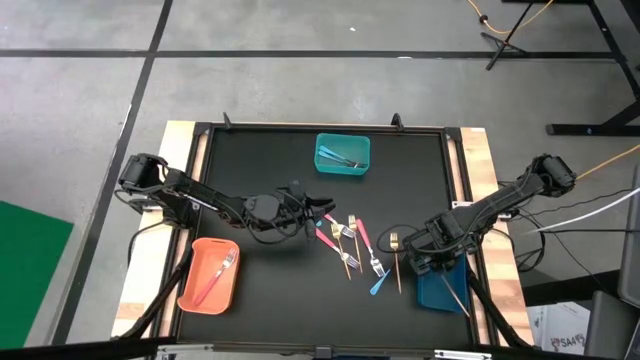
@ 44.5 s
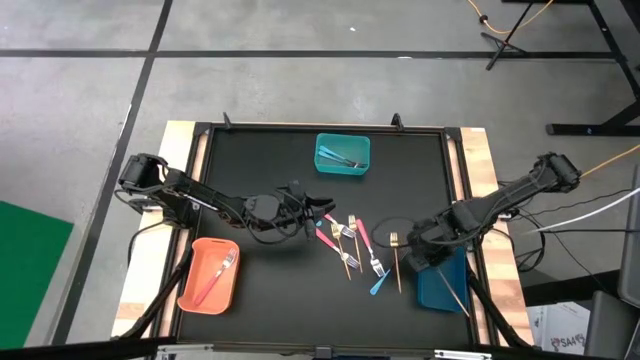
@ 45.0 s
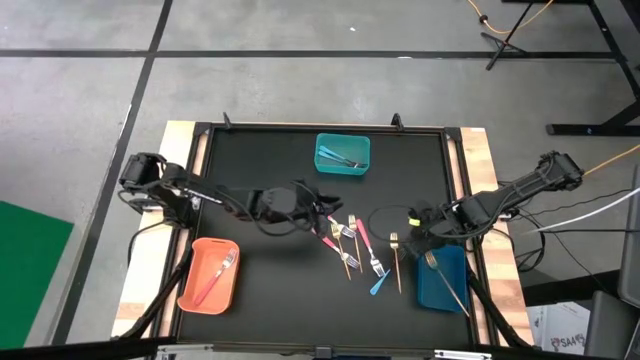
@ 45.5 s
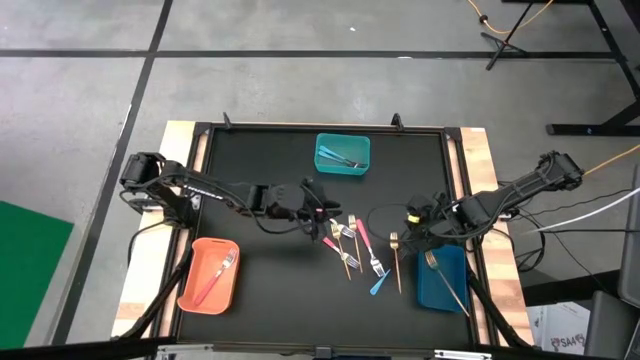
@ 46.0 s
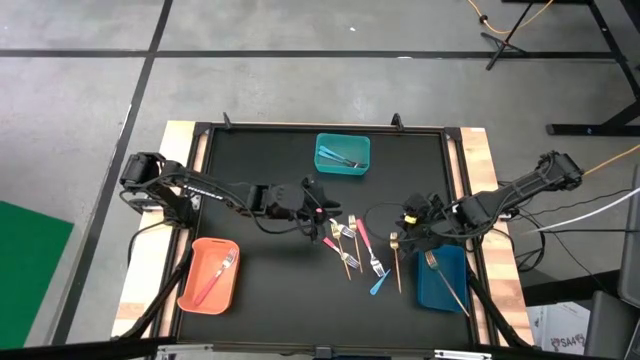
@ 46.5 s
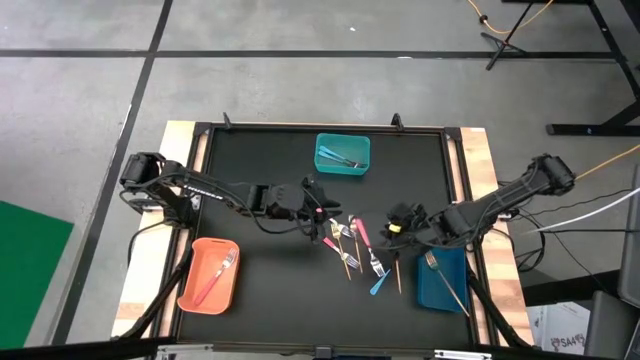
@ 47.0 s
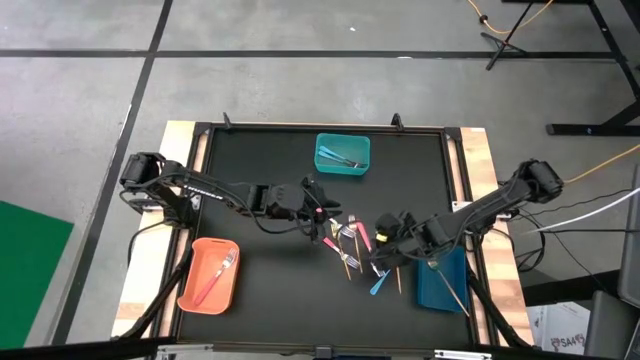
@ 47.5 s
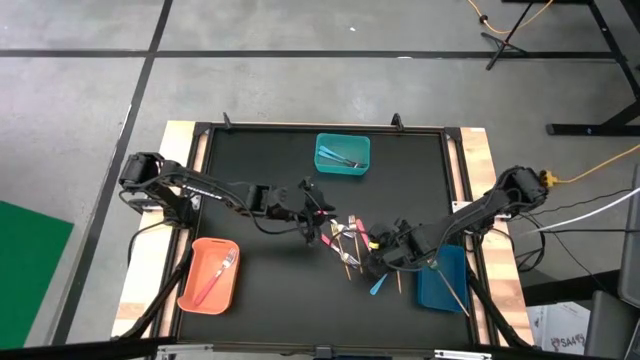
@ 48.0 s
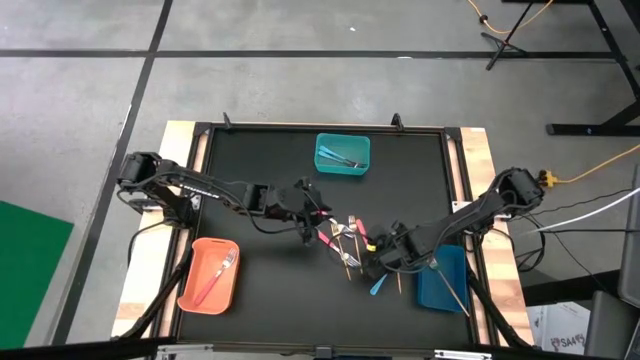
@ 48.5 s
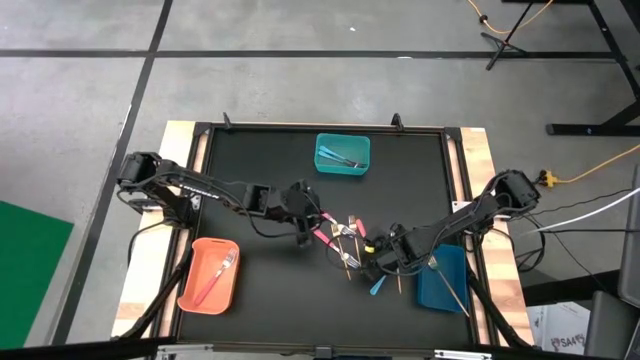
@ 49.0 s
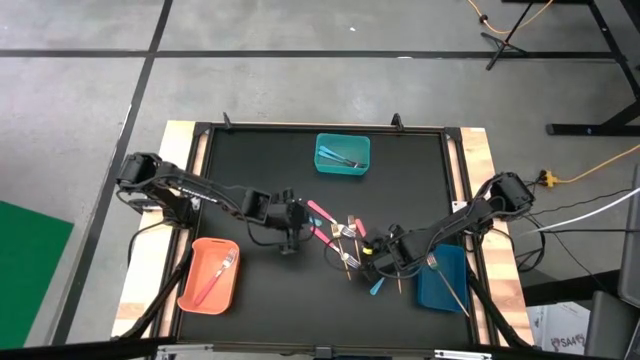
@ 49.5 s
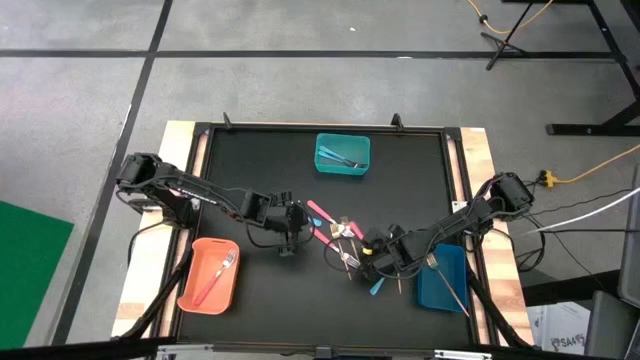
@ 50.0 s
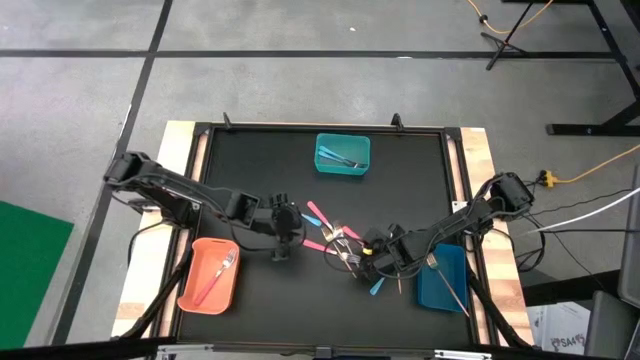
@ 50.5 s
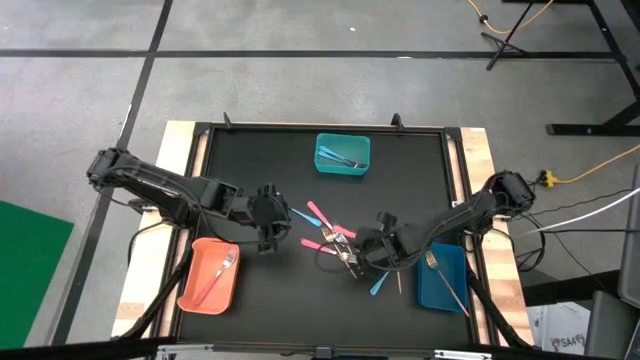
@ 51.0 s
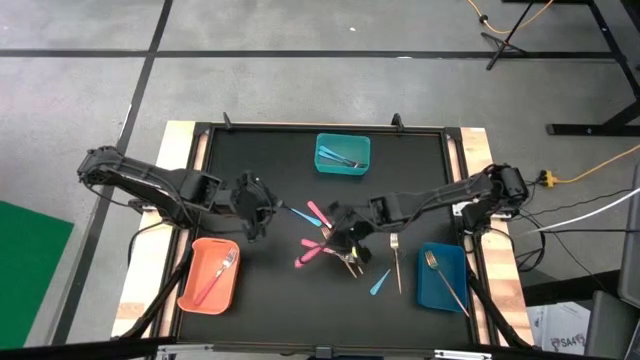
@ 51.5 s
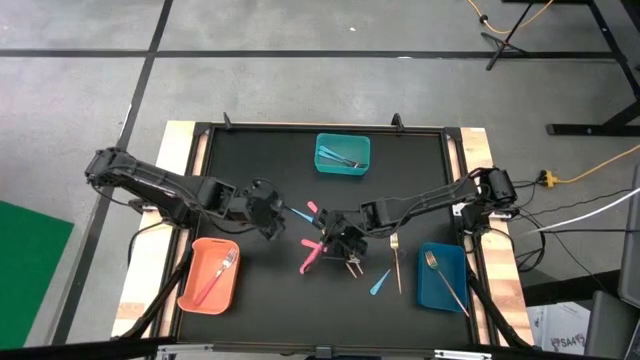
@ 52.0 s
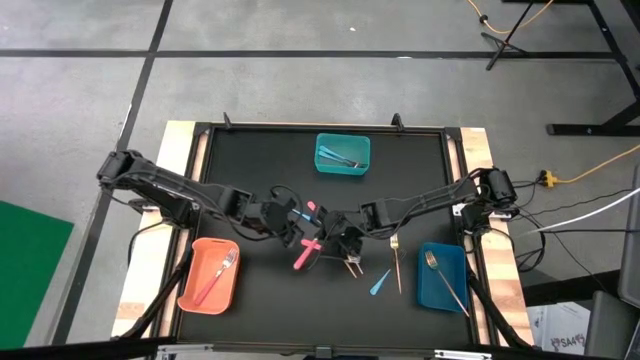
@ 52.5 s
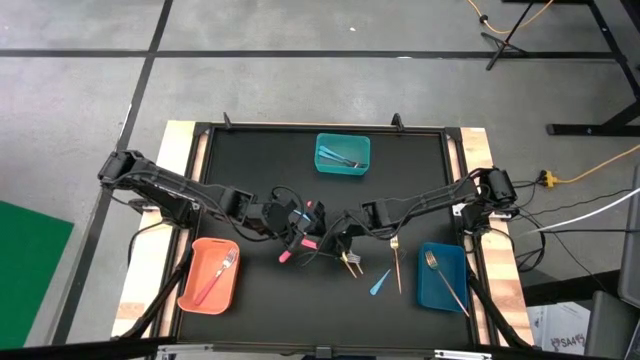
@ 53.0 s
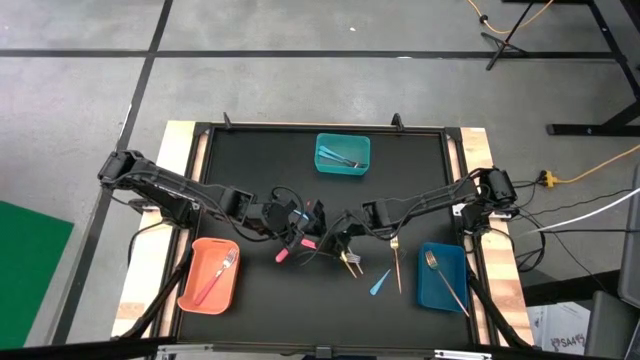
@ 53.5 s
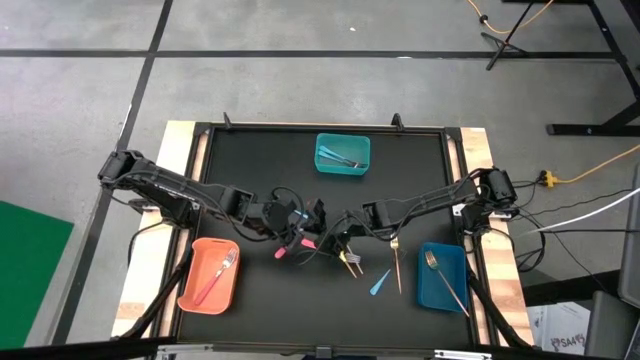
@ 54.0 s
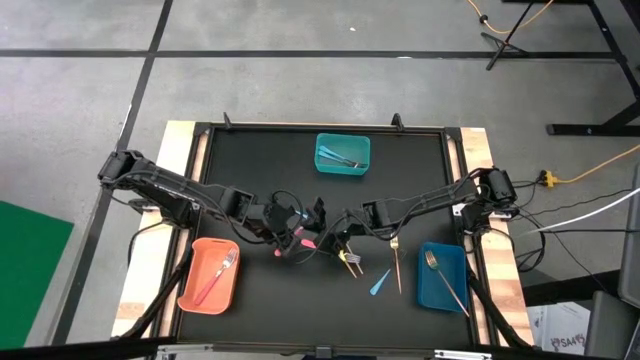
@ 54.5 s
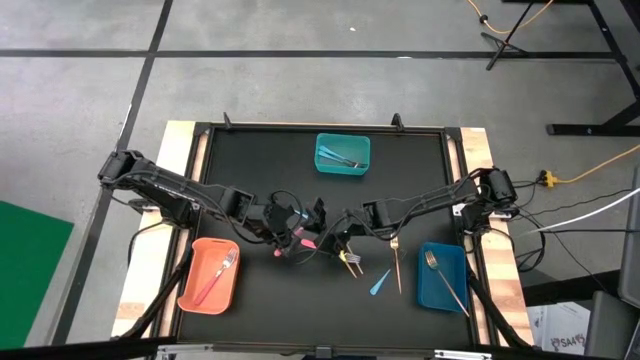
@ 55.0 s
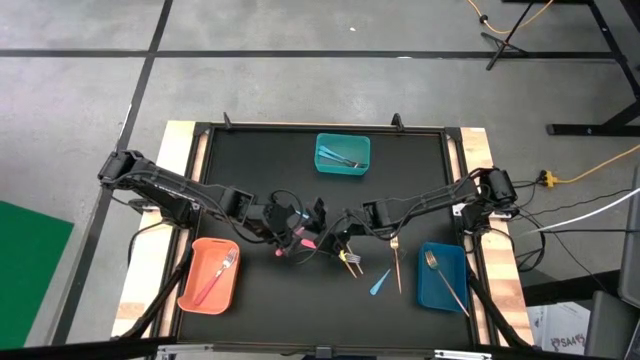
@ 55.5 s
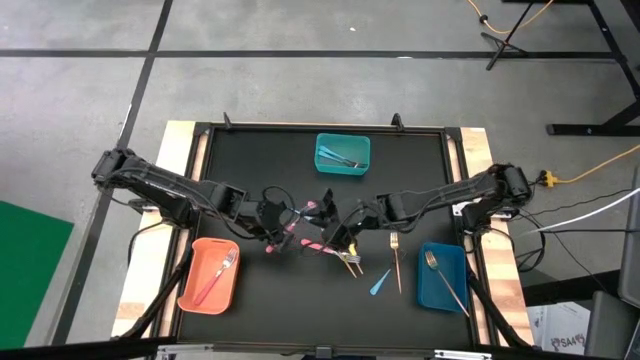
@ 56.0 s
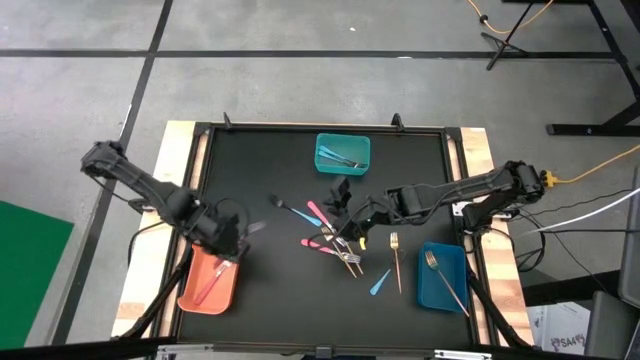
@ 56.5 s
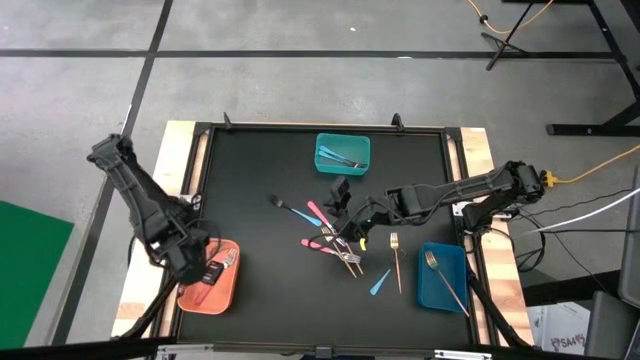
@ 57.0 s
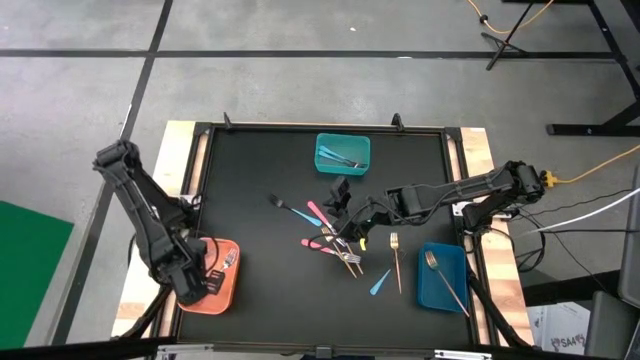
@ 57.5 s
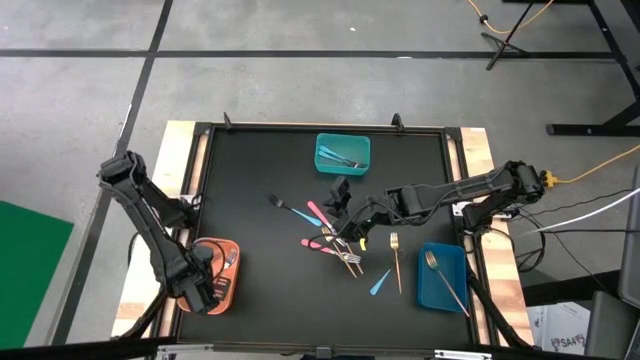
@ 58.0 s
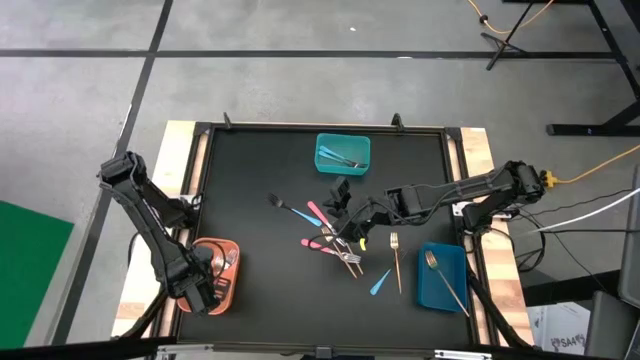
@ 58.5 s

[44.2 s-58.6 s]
Task: Sort silverware by color (type)
Put the pink fork into the orange bin

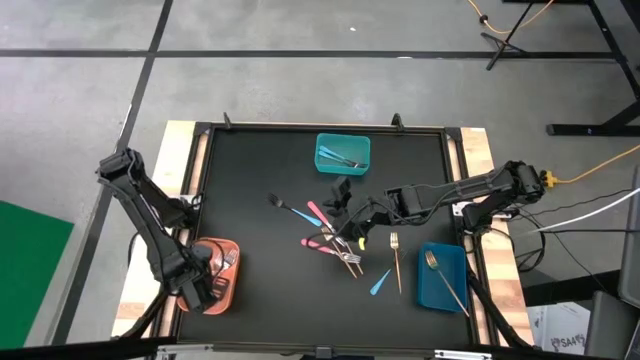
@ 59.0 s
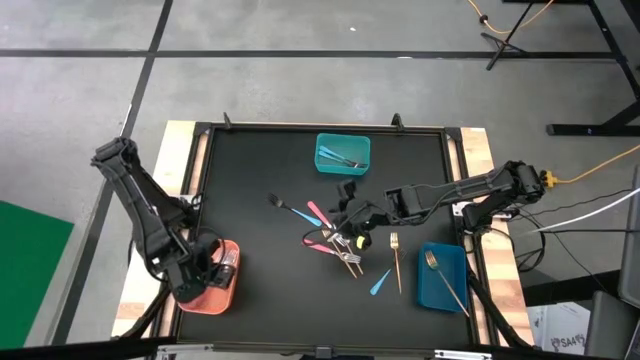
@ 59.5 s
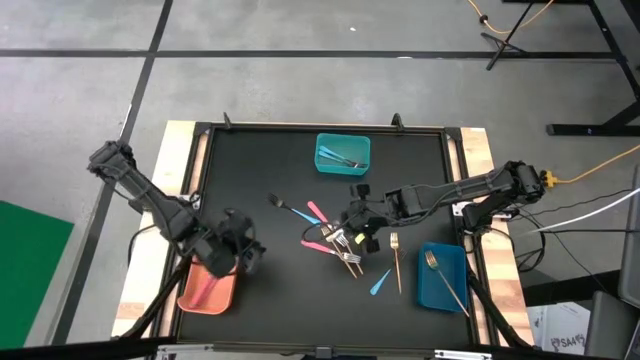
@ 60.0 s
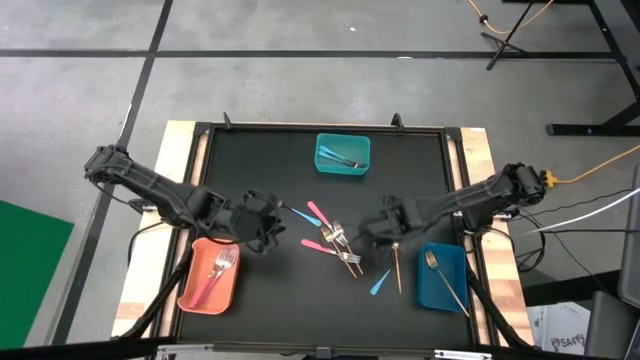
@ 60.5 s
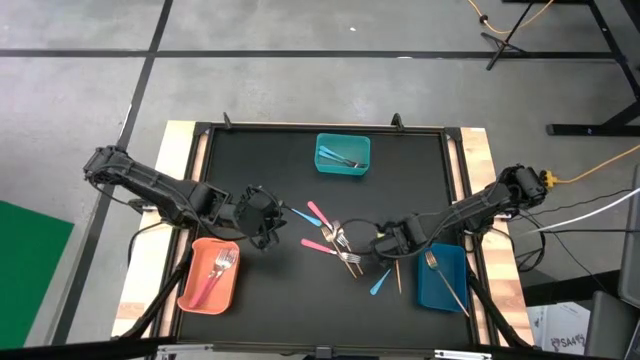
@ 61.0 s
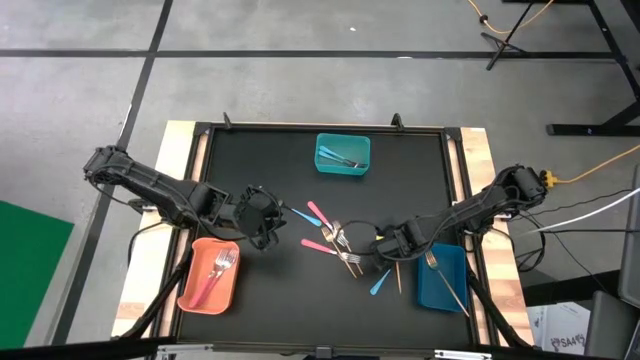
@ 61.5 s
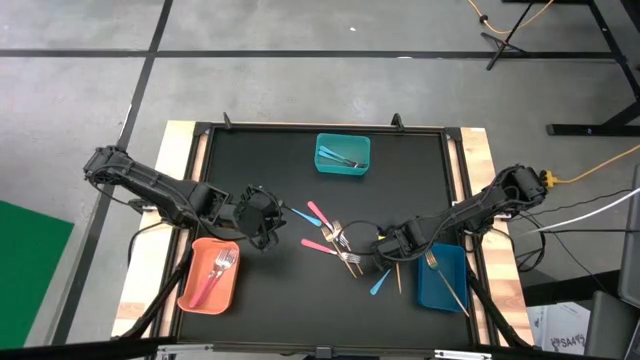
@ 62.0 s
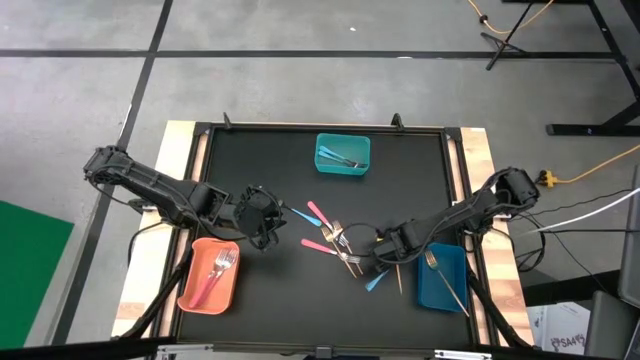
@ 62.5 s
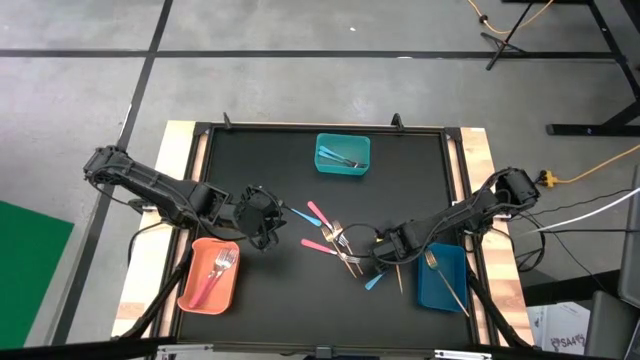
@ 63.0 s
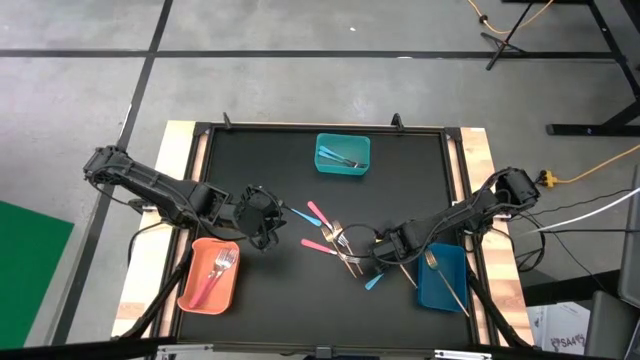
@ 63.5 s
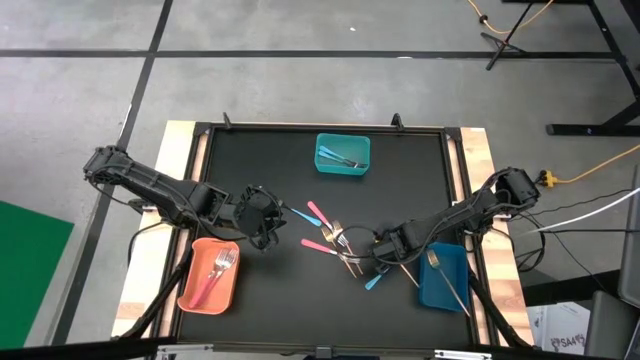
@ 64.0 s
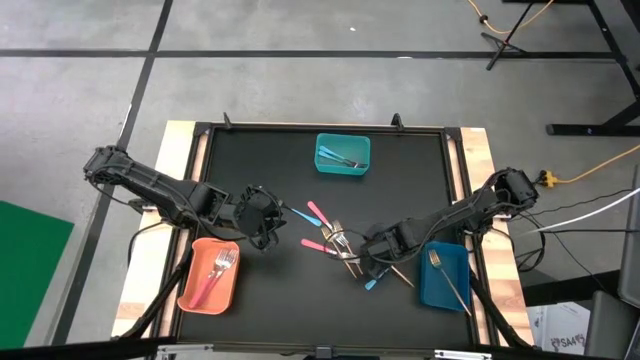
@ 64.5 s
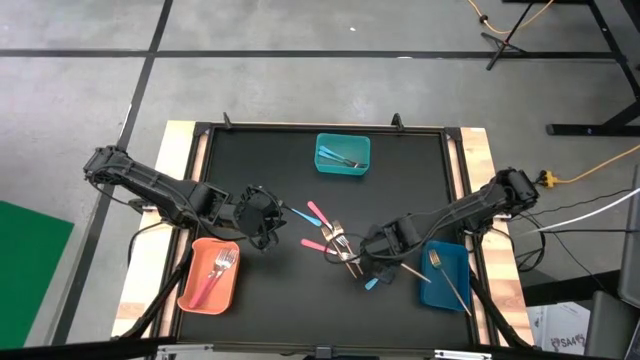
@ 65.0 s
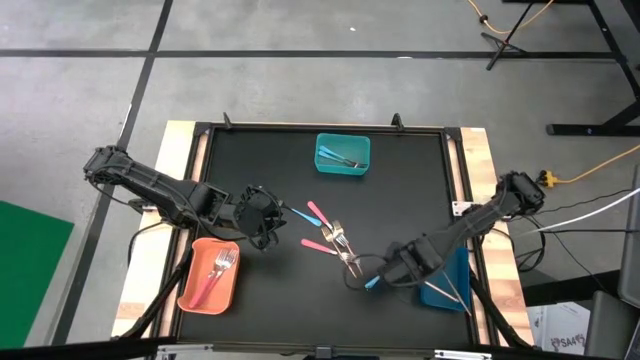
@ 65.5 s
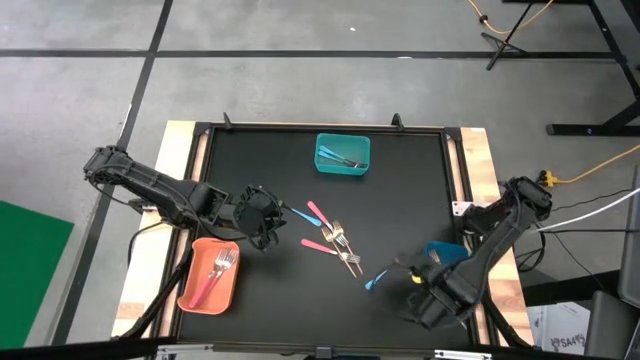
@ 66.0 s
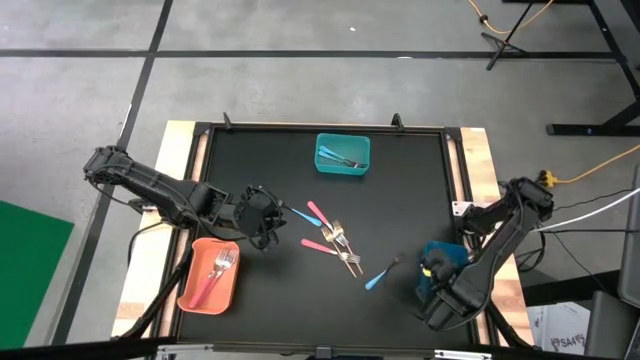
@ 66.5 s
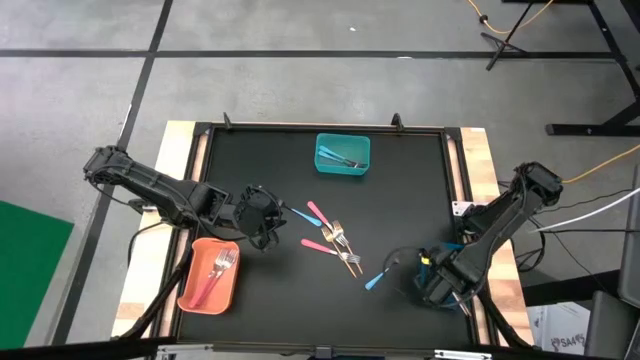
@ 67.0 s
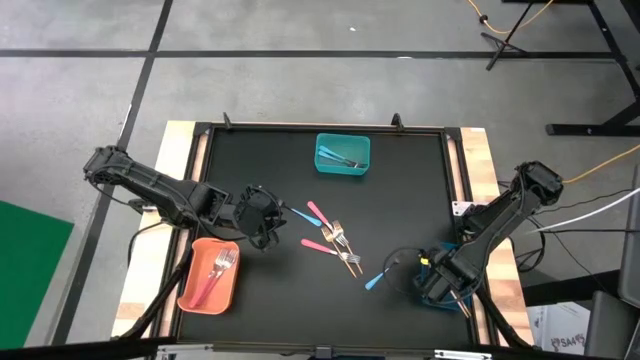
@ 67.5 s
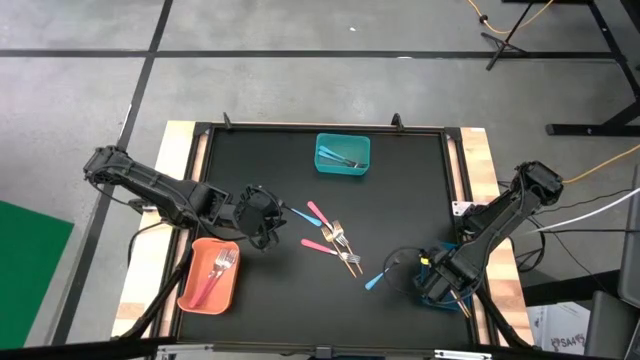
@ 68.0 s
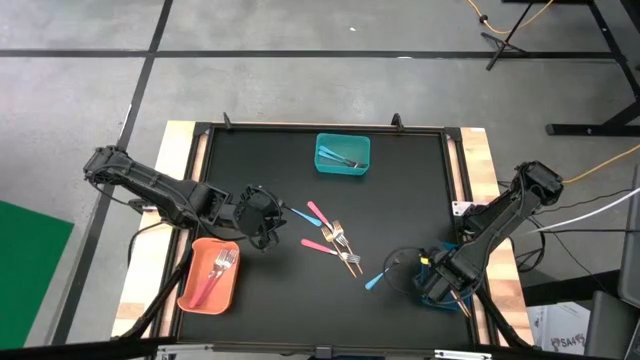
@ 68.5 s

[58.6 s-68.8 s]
Put the gold fork into the blue bin
